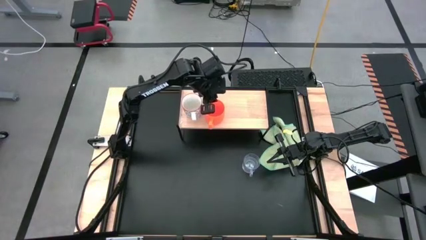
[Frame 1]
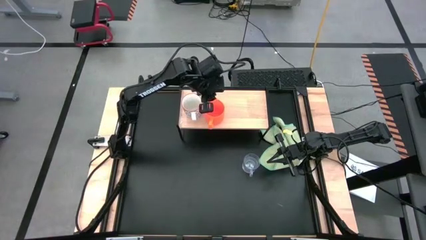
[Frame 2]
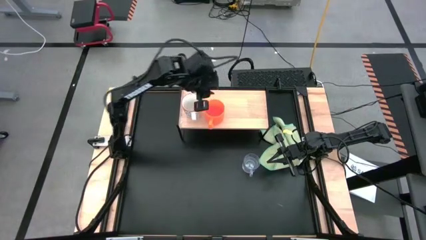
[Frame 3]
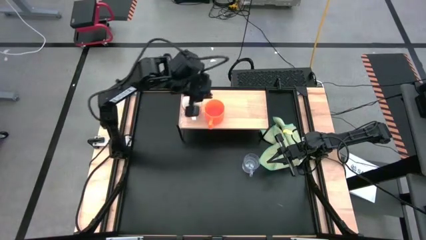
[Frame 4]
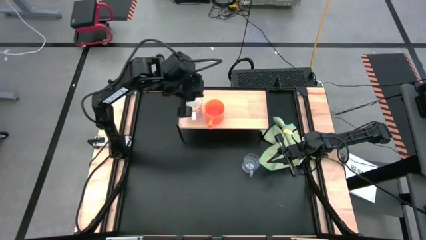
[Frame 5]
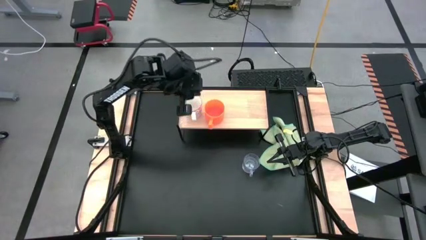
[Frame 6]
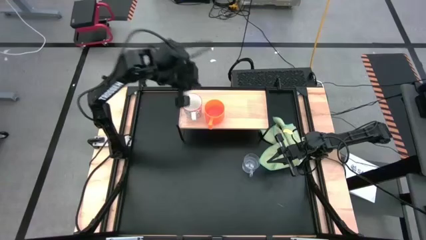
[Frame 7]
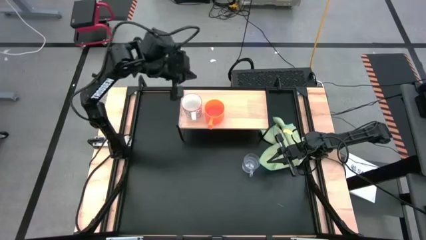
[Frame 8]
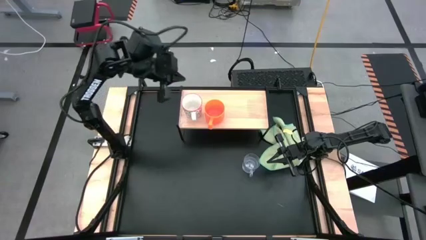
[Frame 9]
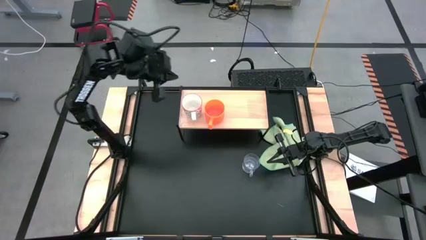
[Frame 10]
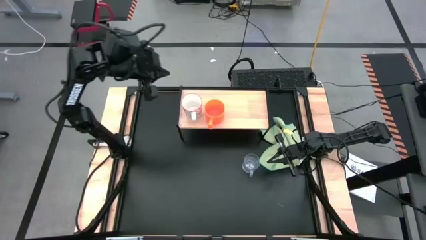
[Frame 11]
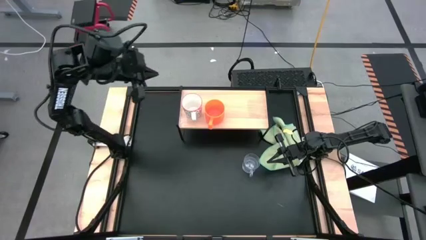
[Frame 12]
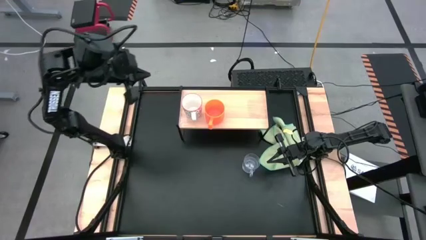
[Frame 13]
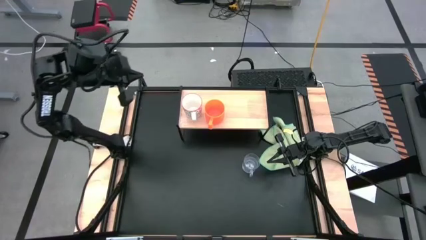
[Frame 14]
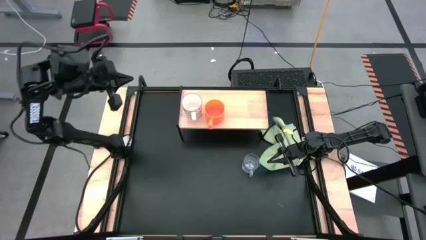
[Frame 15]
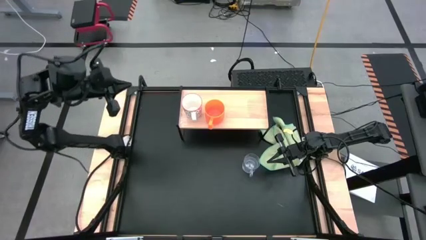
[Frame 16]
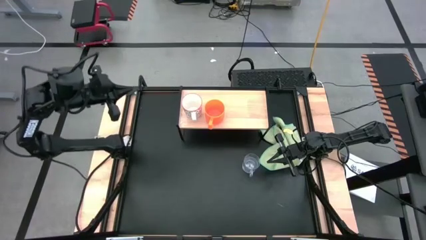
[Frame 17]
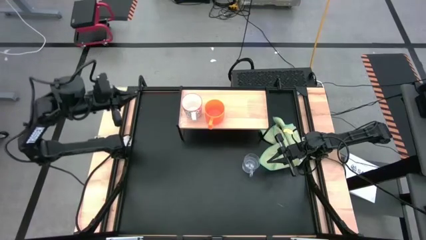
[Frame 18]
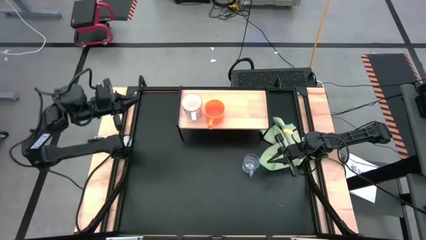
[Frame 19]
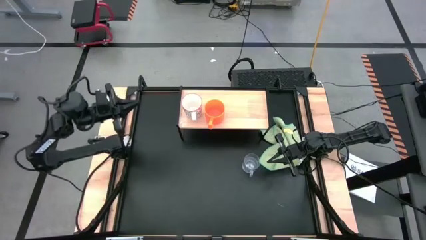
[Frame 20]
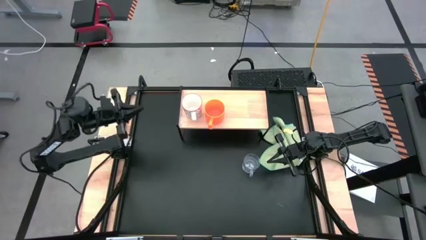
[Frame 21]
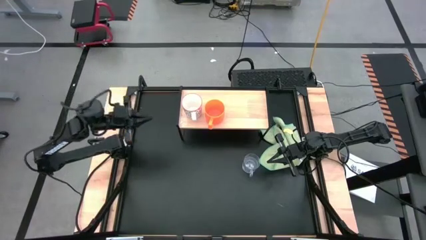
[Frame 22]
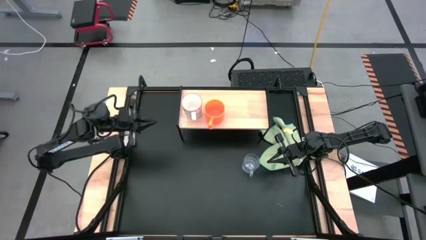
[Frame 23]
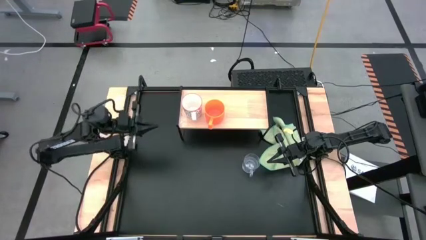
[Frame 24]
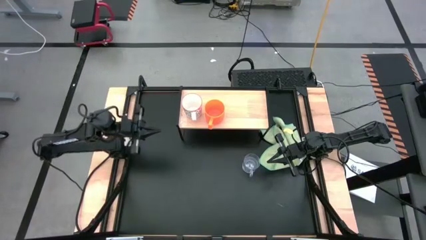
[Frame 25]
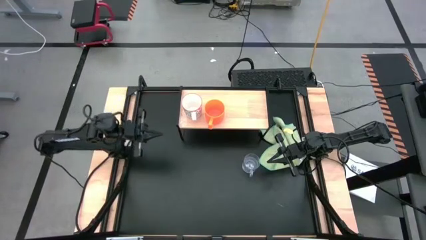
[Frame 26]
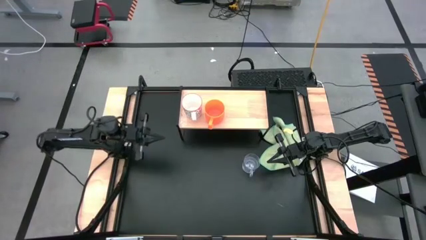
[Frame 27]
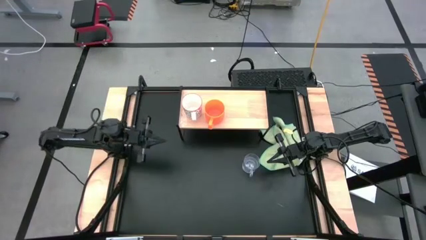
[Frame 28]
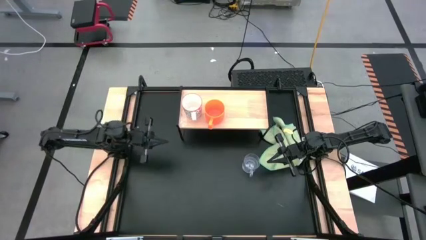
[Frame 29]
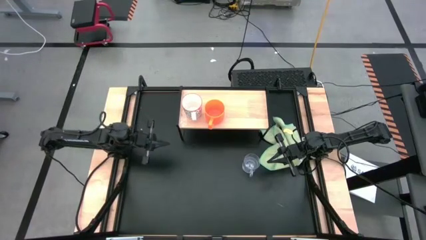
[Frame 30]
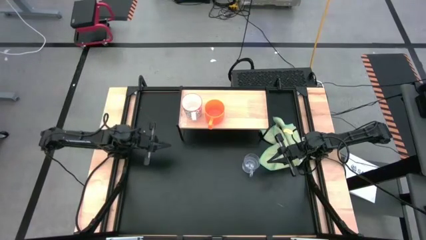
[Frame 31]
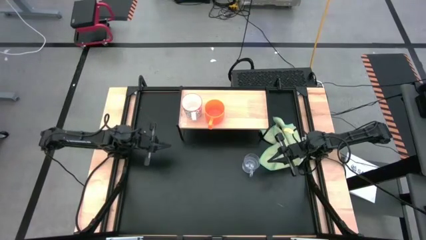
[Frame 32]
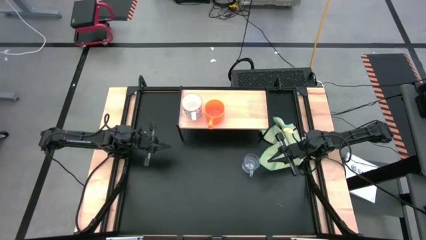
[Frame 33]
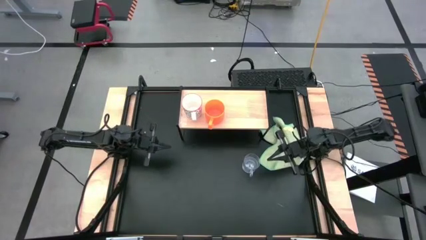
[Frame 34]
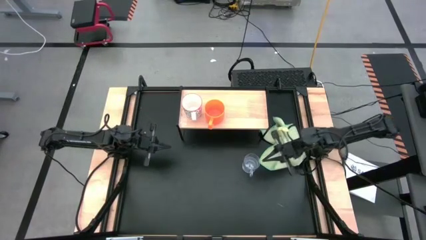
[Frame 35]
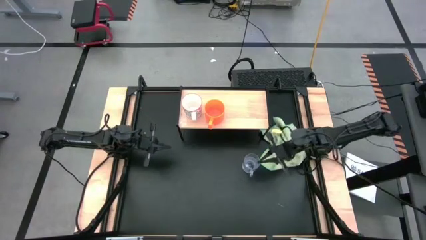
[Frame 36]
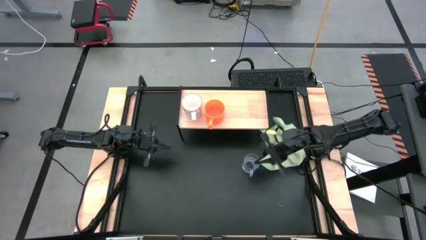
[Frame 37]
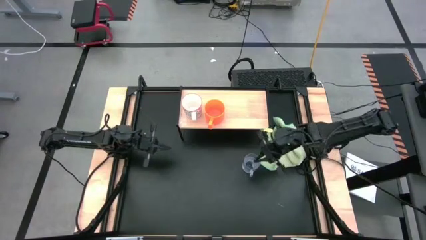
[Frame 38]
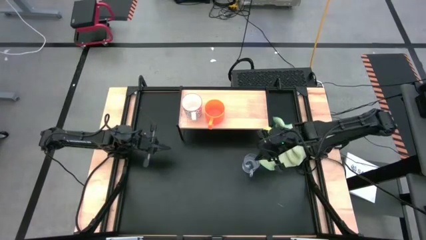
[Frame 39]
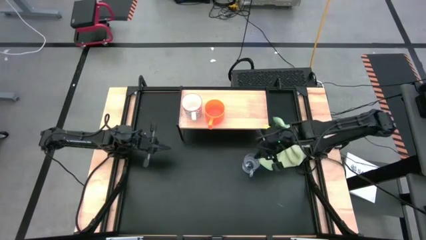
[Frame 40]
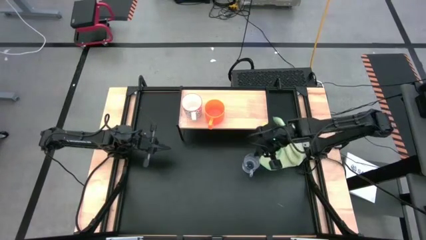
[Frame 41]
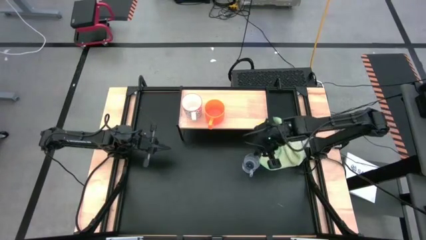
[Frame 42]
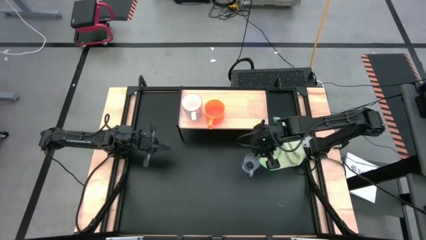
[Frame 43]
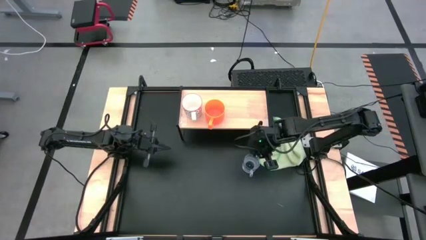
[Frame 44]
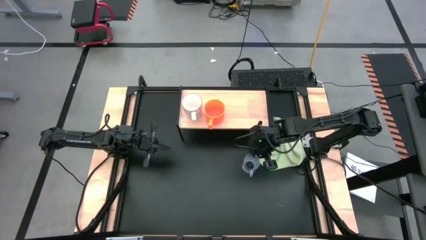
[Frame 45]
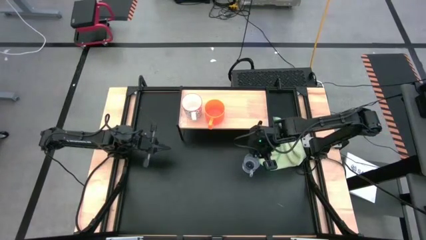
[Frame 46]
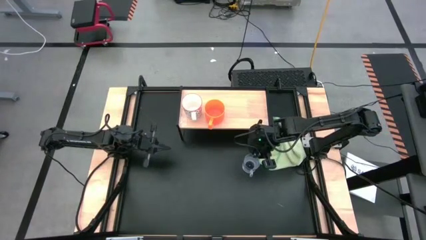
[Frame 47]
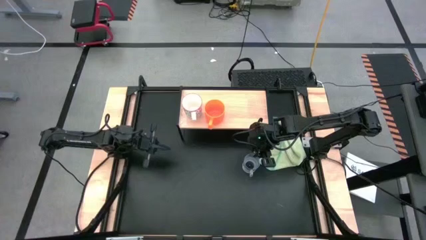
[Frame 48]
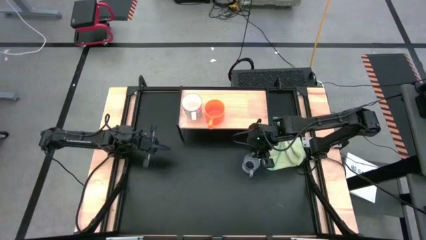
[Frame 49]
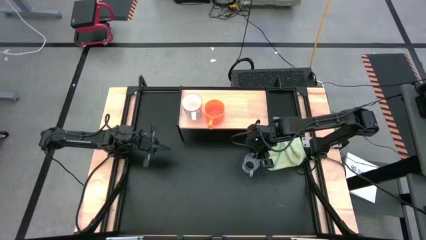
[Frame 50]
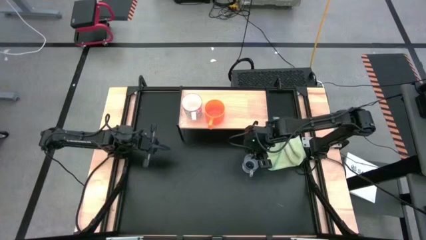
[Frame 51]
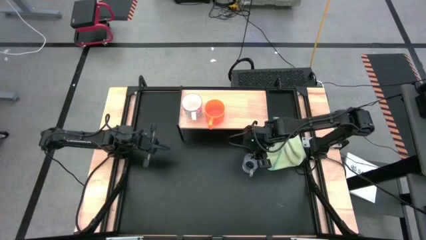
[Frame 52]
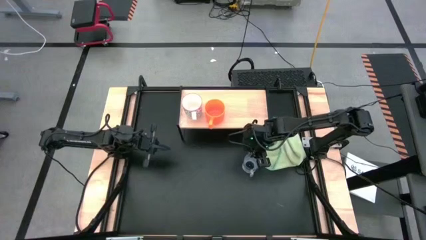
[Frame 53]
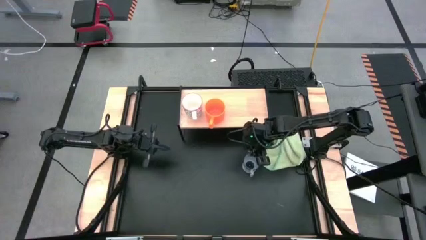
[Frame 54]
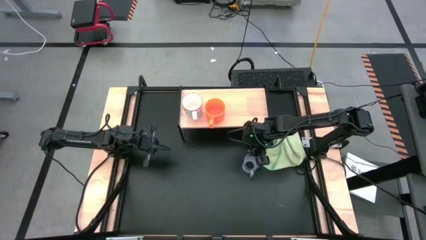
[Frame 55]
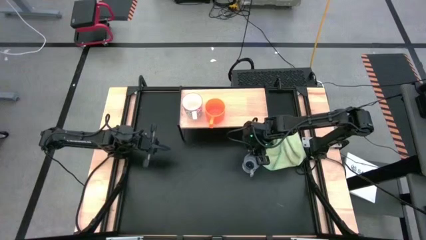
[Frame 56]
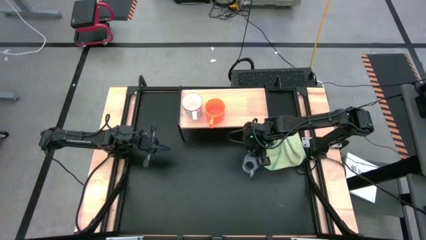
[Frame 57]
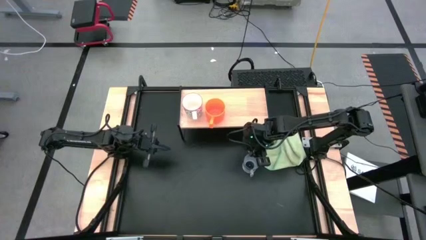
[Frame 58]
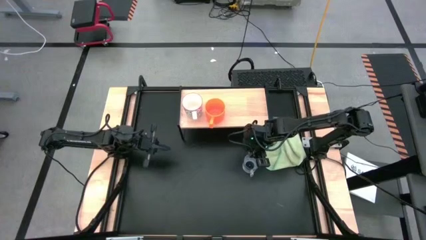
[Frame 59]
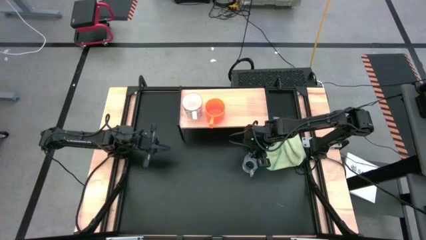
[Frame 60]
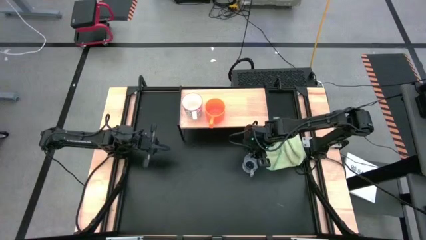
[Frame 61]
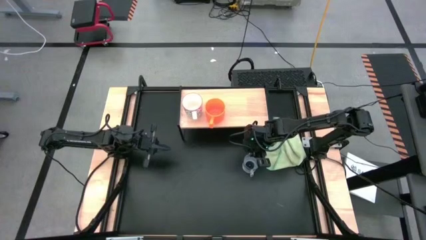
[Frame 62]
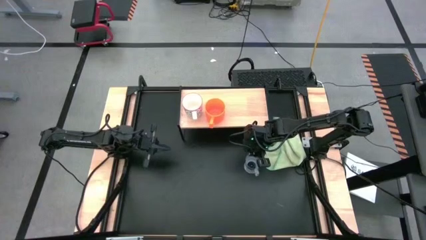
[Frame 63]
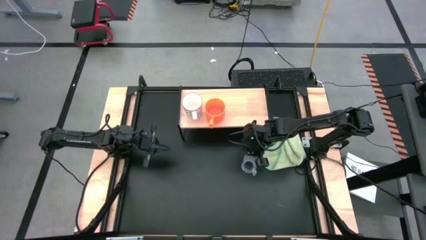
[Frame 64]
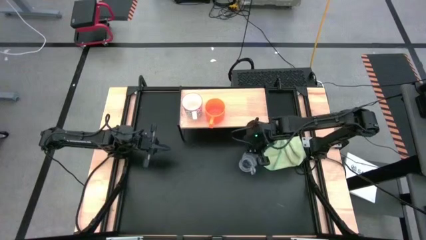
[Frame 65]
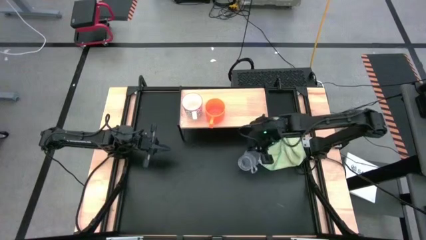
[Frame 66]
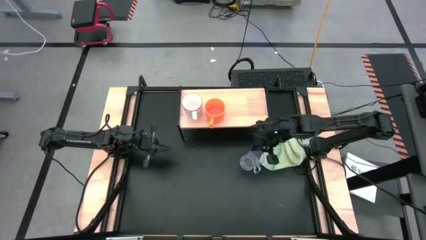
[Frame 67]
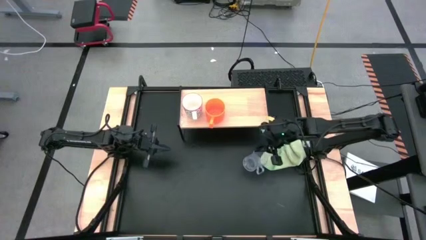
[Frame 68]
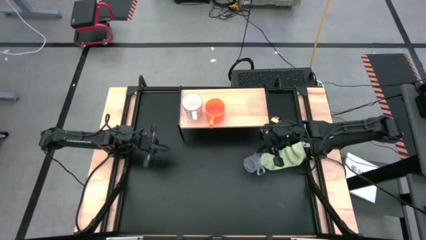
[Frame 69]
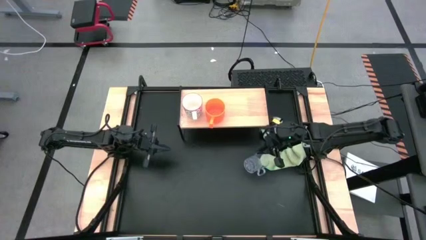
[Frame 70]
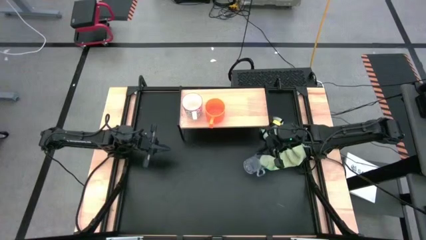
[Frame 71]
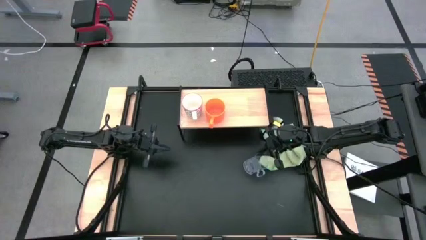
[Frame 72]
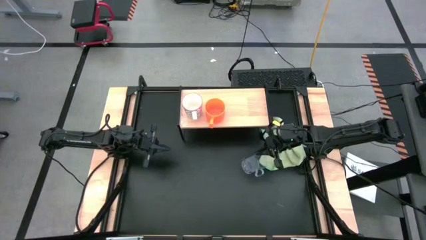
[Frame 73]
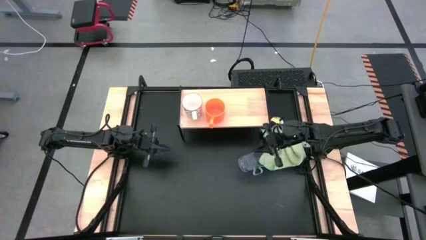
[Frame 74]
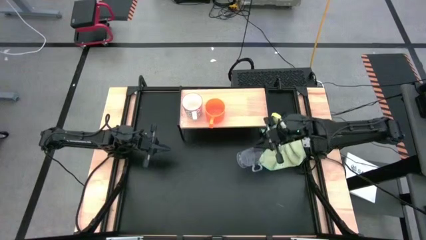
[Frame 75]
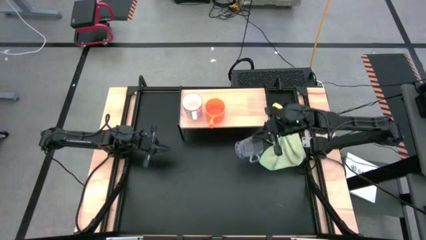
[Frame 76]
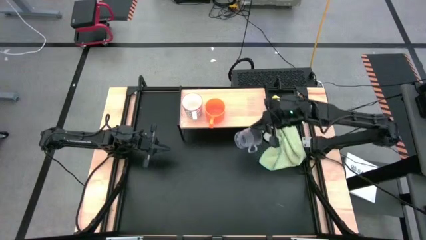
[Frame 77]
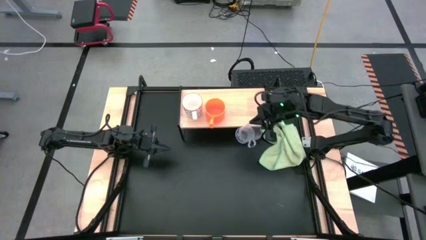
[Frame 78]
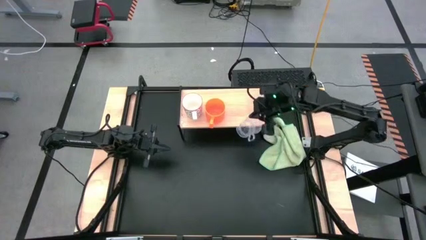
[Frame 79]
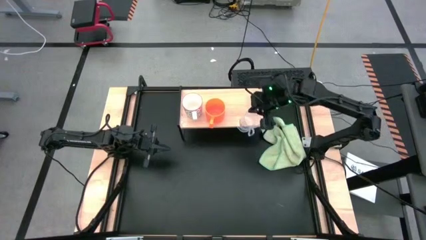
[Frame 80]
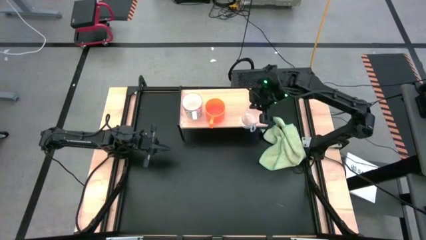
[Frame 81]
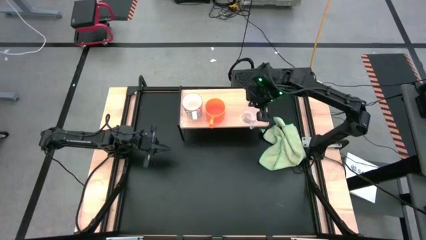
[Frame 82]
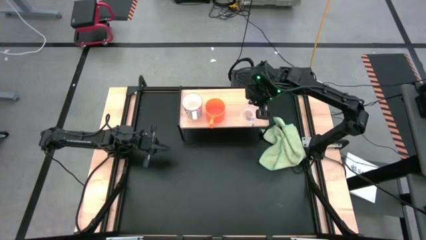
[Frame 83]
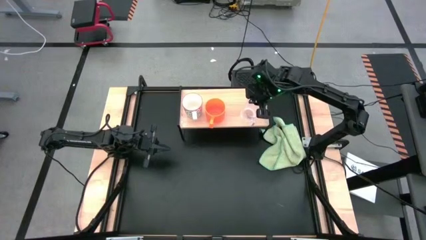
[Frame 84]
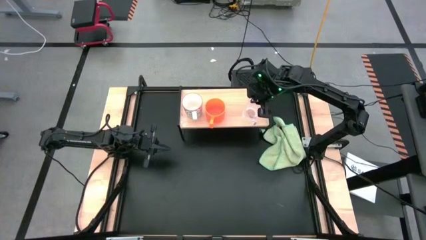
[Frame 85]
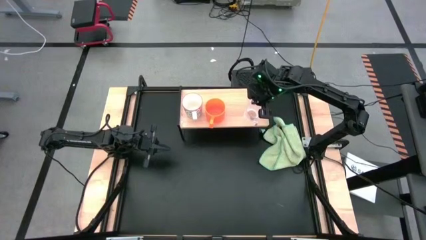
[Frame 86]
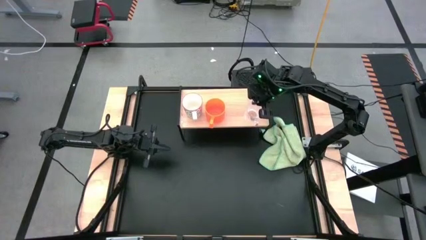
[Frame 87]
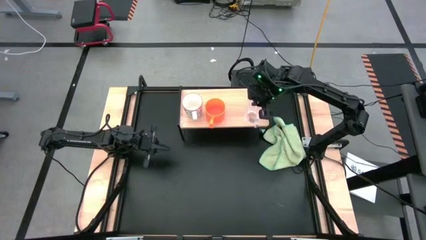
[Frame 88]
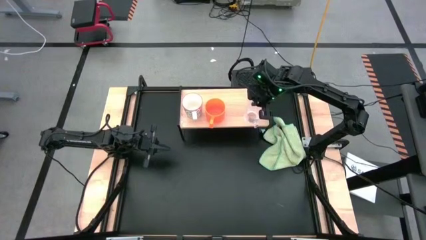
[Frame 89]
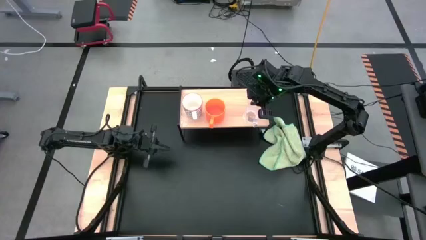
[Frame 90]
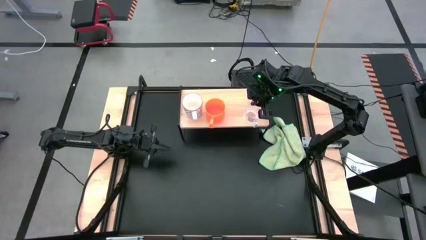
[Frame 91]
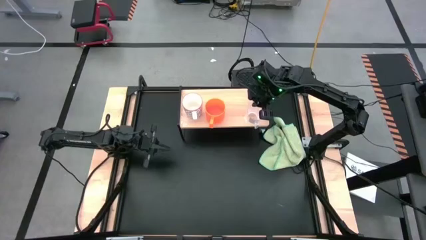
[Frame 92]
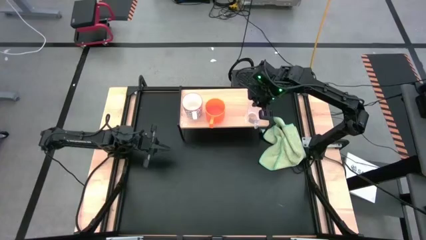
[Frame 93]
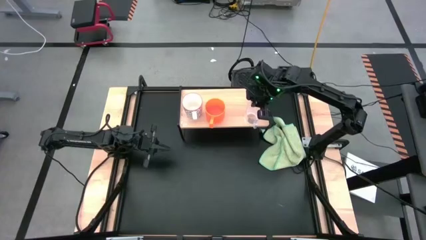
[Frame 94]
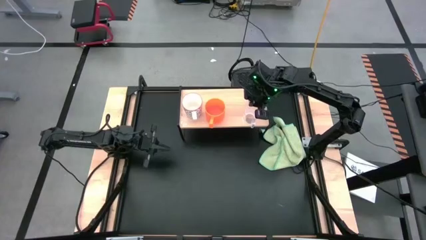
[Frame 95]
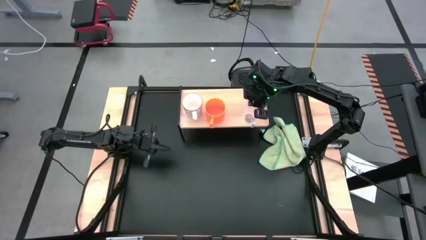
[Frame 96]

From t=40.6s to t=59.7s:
Task: Stack small to large cups/mugs on shelf
Put the transparent cup on the shelf
